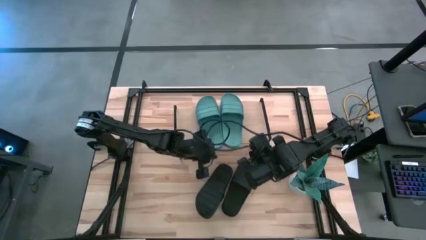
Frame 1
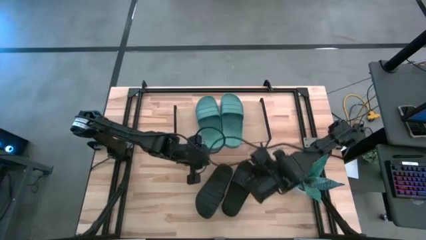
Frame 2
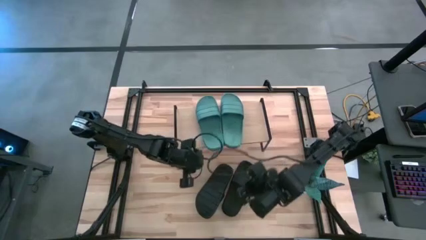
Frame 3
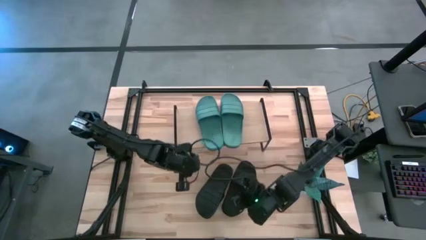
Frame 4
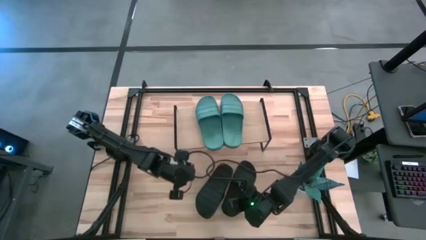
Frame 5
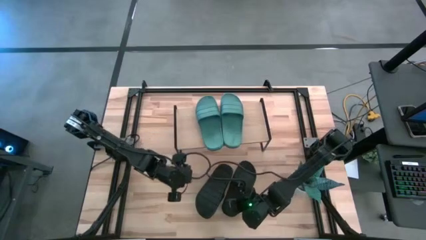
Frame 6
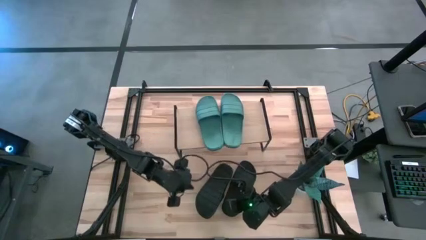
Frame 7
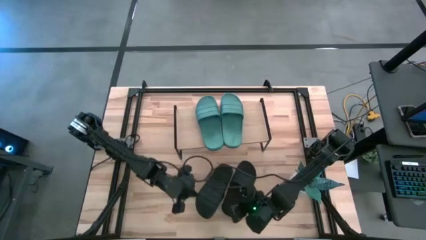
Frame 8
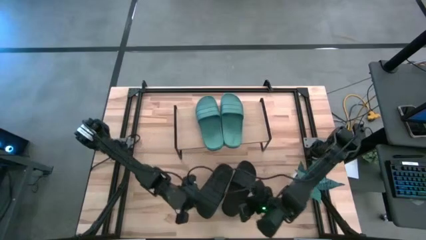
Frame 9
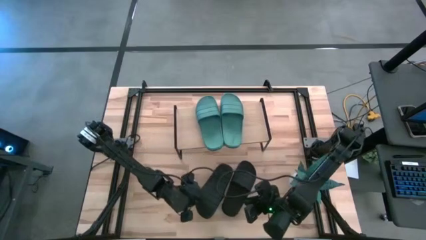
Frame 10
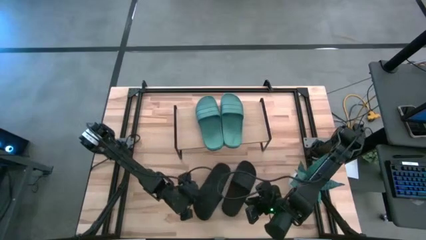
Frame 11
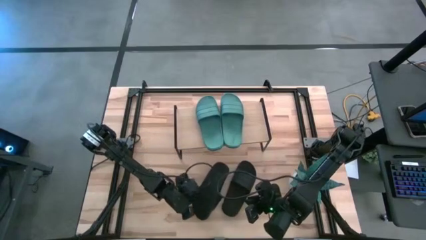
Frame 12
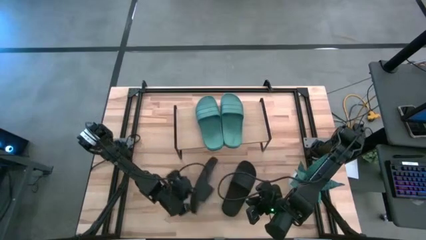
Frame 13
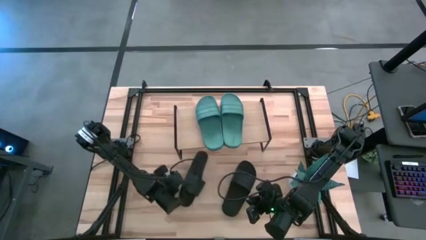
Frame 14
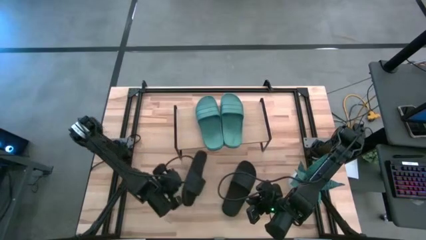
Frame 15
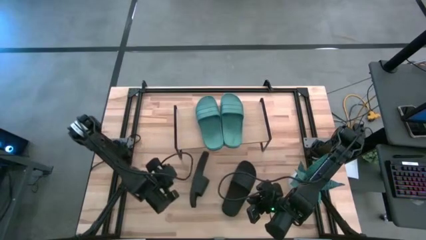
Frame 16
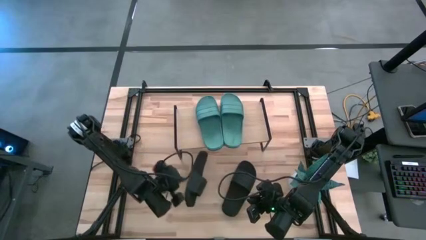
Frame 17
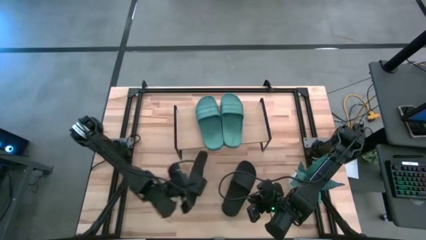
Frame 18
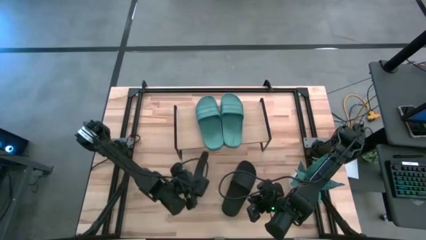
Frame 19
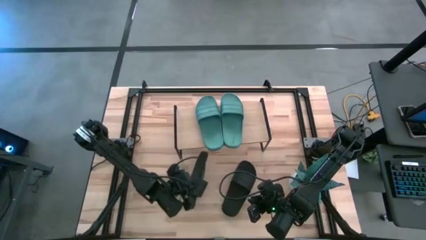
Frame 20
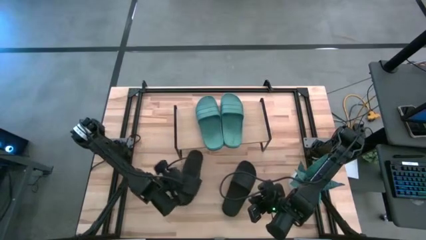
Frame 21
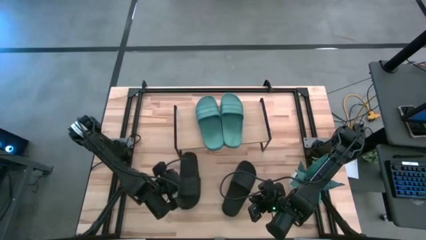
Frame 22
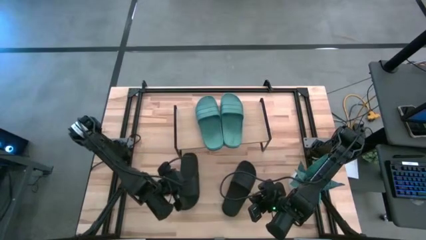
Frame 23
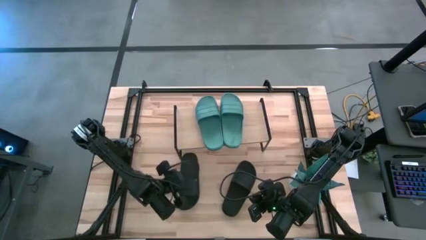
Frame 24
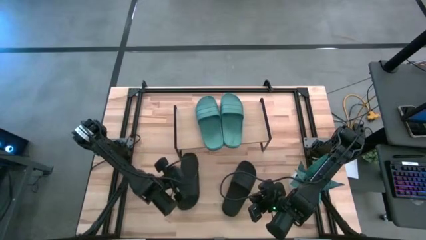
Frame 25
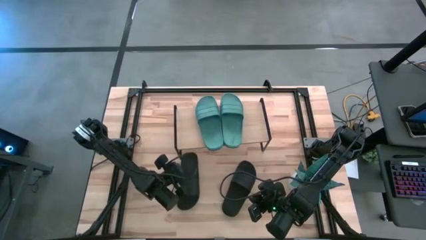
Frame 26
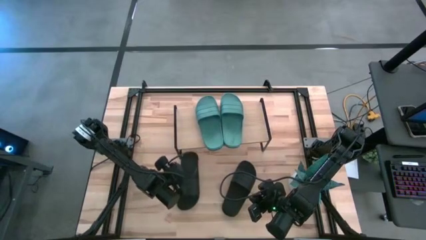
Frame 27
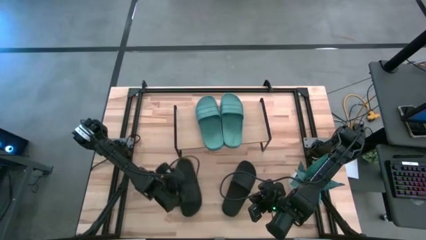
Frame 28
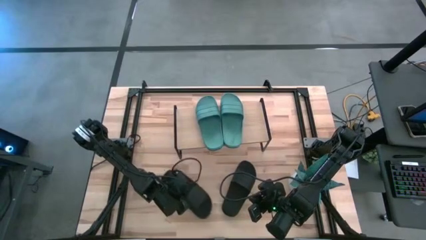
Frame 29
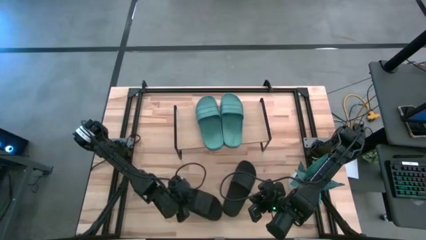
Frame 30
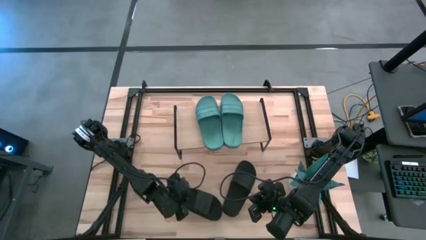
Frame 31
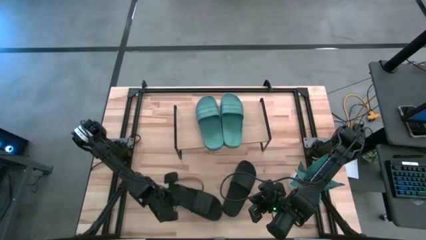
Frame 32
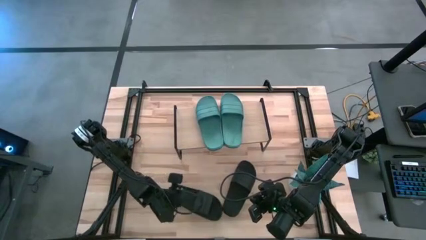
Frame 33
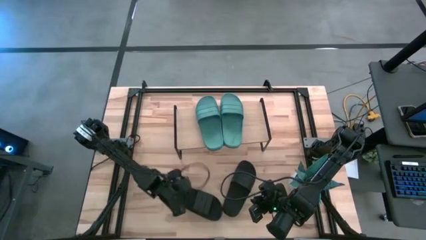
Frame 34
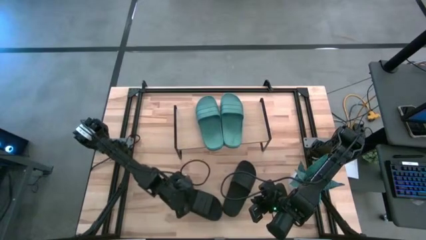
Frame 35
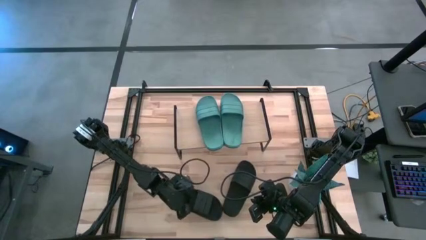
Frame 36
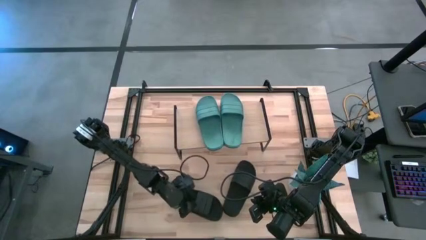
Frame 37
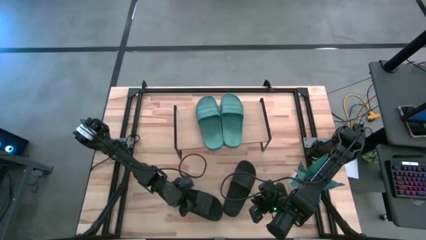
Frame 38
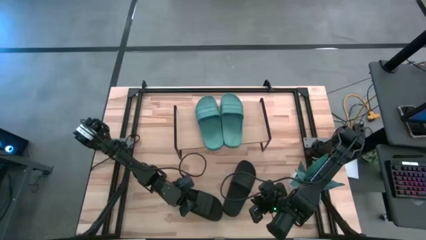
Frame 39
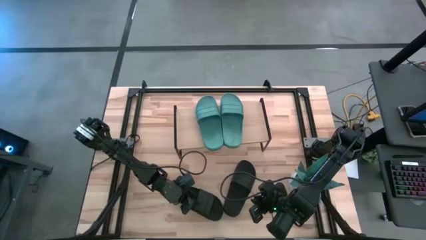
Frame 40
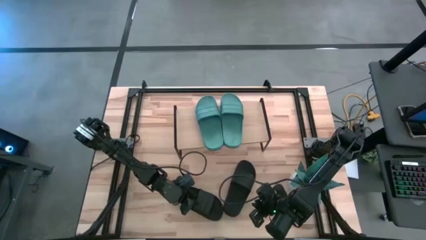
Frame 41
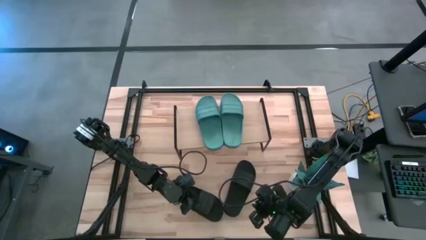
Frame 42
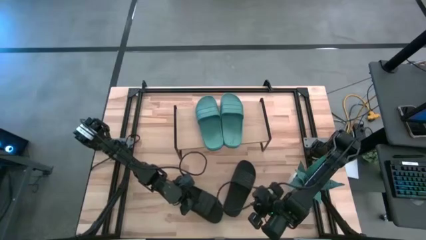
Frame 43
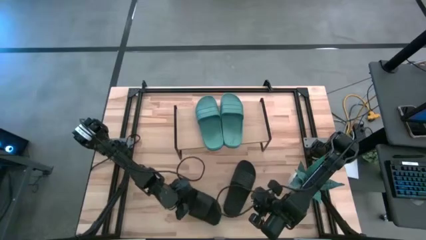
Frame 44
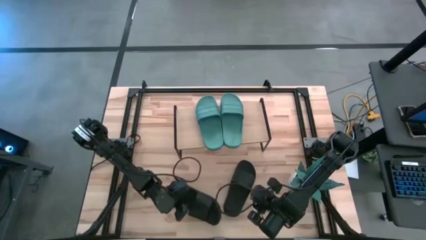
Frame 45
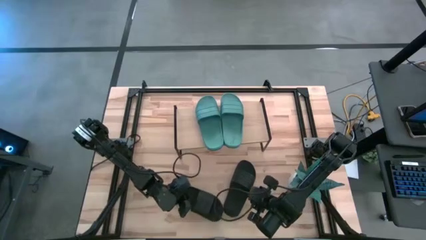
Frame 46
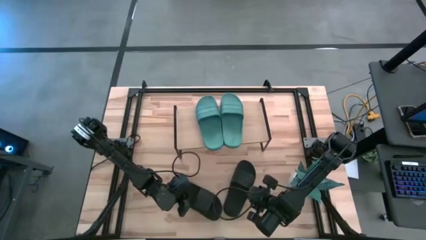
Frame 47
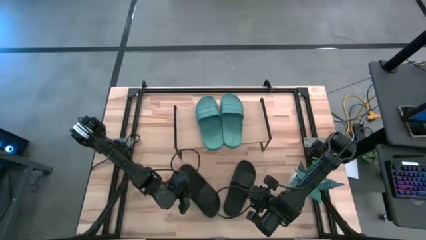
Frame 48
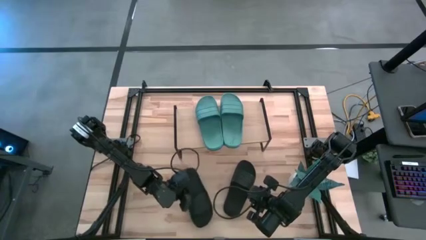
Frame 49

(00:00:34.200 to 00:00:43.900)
Task: Pick and place slides into the shelf
Adjust the black slipper

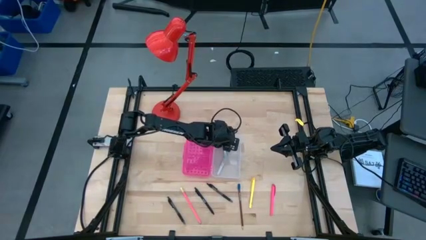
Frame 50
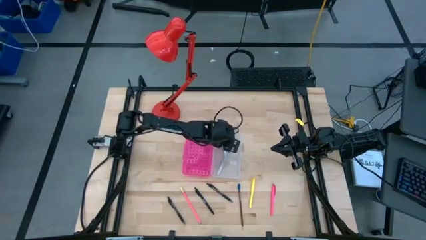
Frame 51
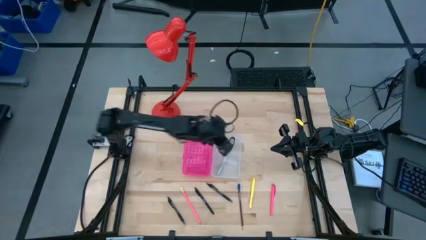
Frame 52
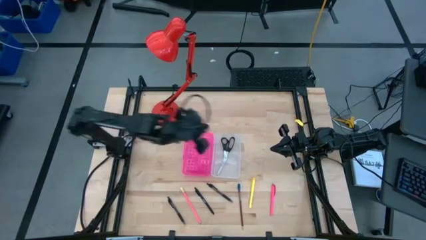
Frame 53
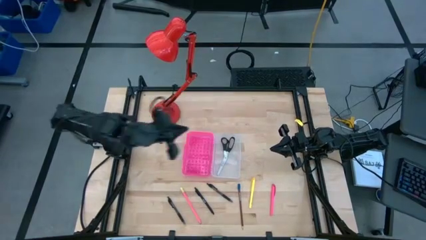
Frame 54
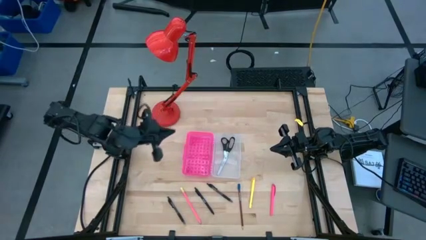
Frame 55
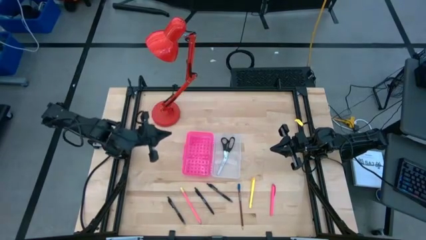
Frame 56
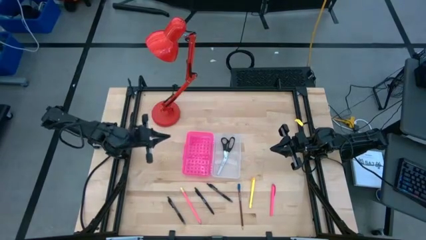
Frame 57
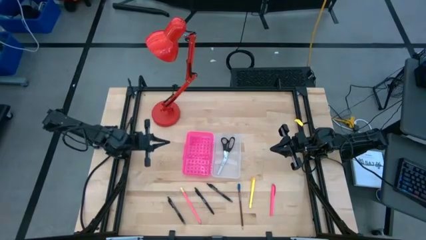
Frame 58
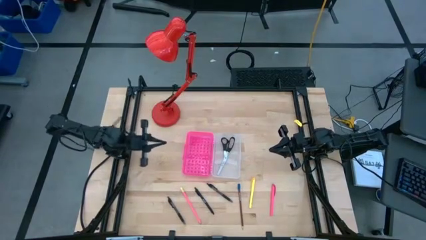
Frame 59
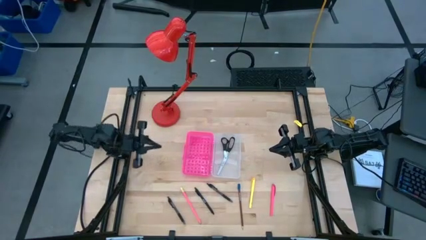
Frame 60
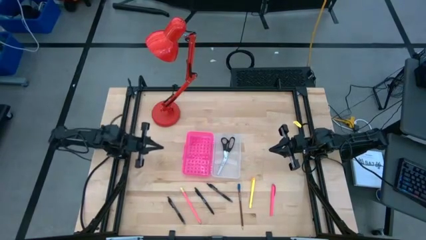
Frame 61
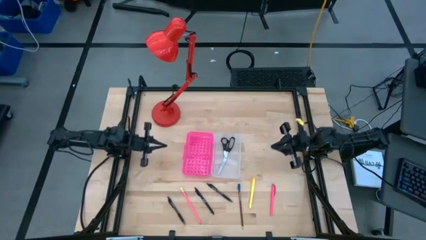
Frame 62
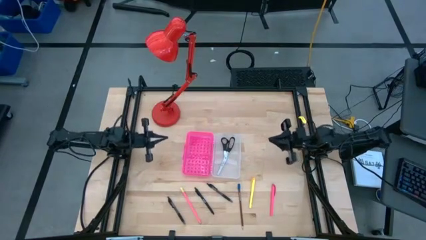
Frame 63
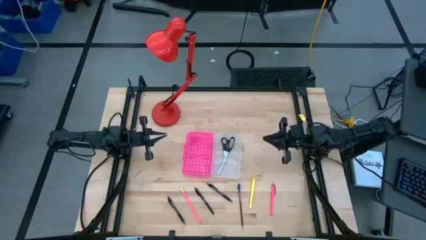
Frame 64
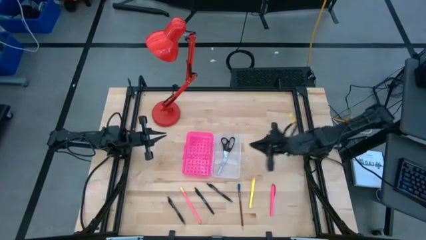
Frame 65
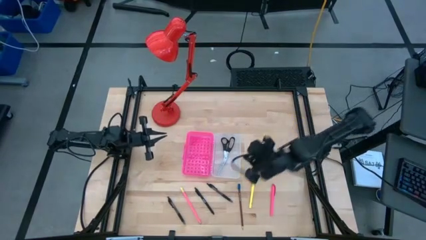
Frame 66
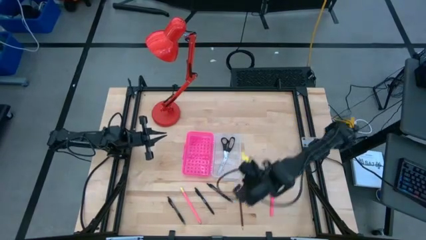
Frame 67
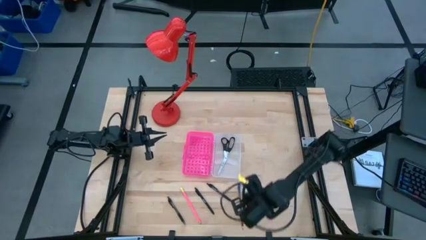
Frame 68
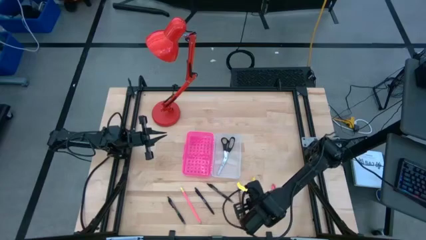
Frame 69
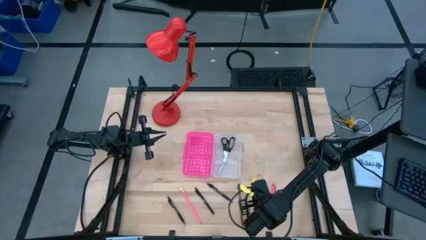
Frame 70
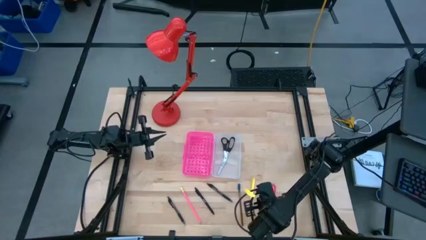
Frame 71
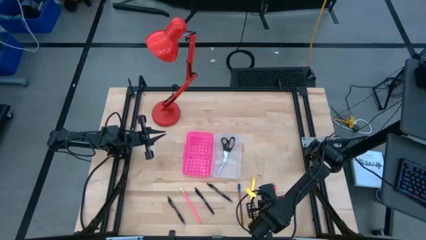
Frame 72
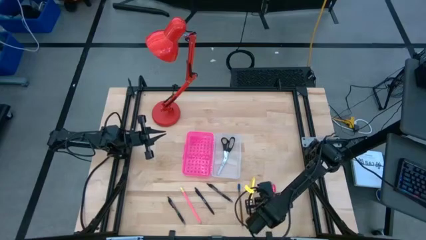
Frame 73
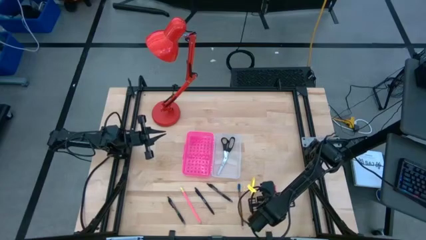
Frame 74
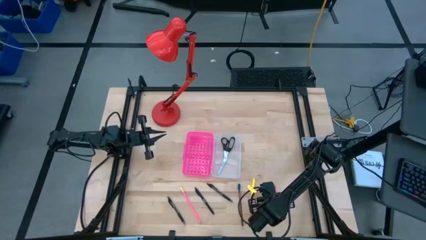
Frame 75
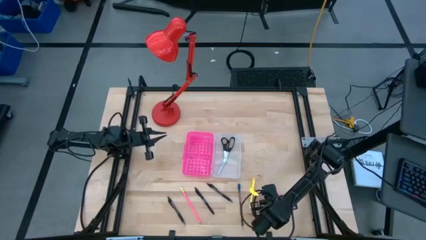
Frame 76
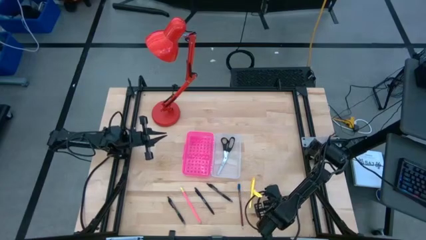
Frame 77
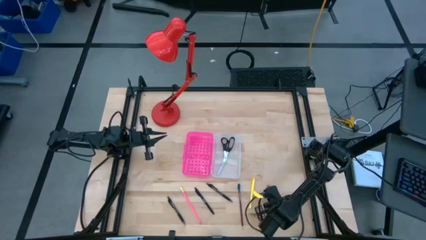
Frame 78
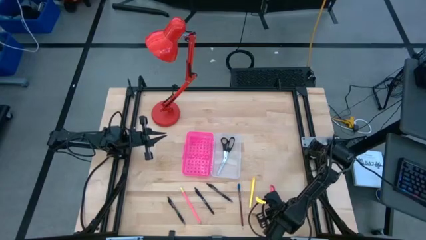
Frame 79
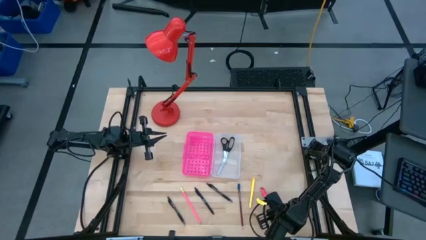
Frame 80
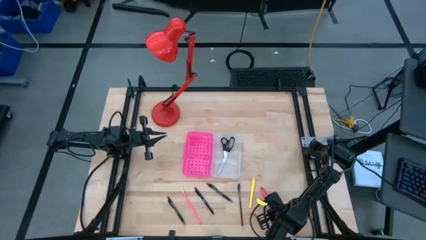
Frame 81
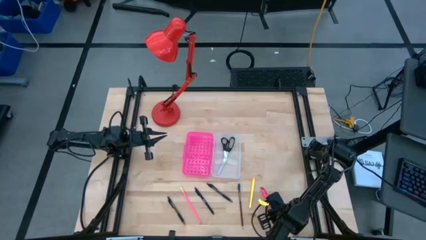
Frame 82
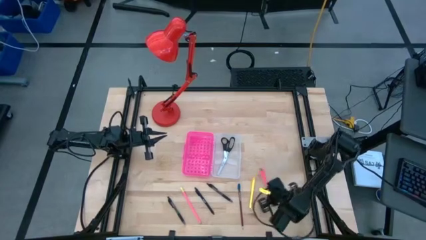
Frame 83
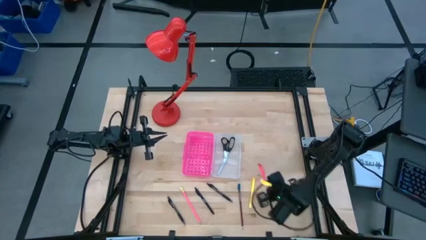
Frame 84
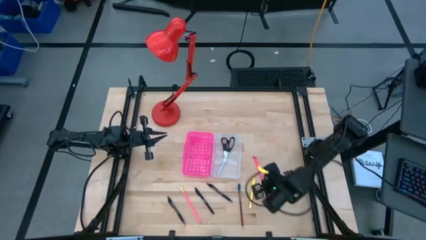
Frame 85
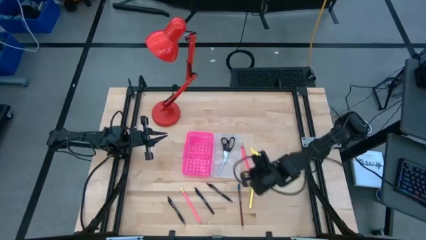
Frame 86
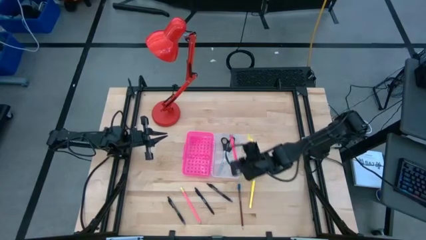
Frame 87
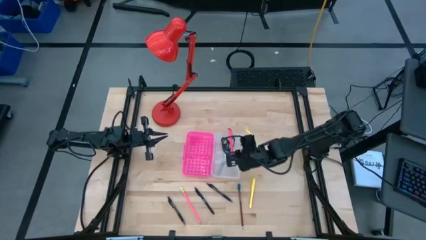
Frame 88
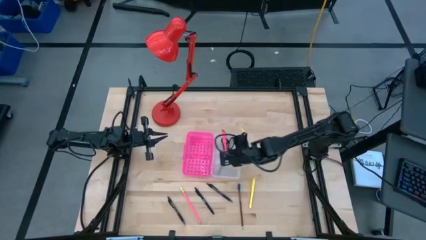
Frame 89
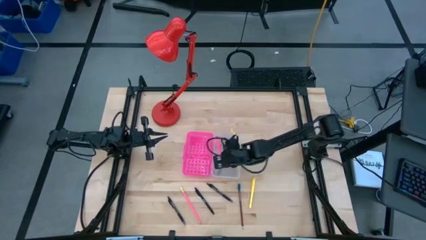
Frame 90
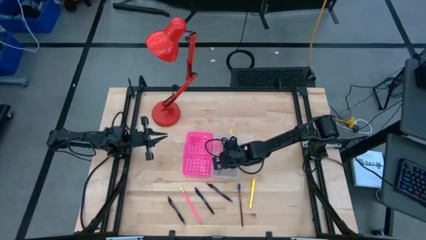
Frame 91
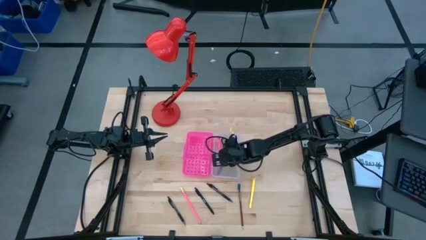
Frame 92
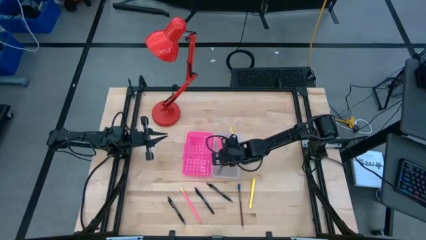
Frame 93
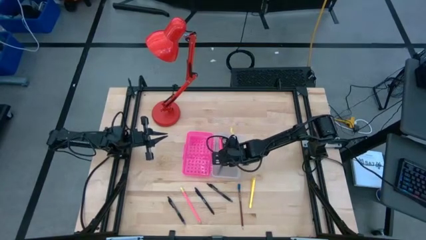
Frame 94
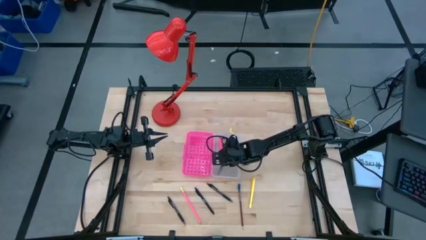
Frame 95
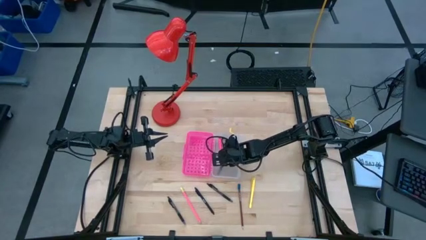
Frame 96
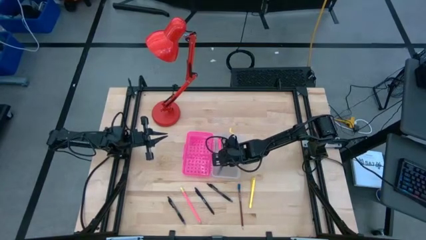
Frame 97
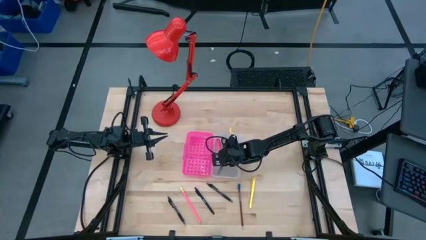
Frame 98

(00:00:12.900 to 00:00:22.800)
Task: Pick & place school supplies into a supply box
Put the pink pen into the pink supply box
